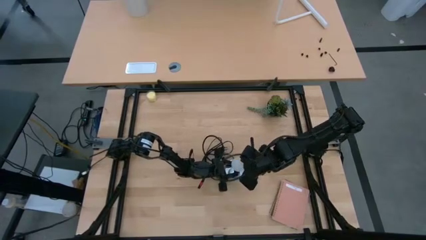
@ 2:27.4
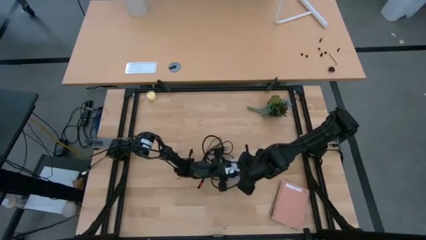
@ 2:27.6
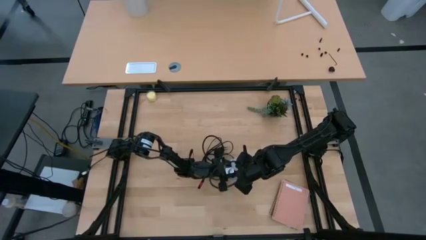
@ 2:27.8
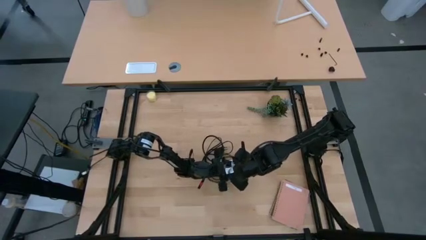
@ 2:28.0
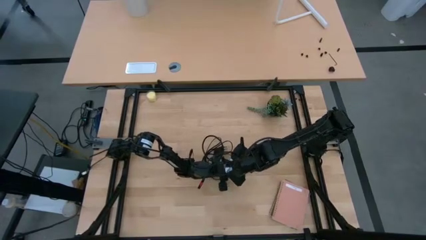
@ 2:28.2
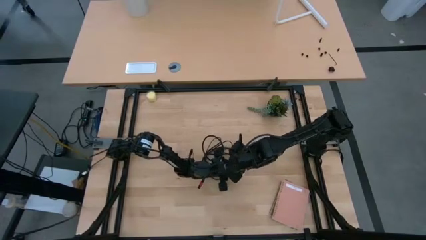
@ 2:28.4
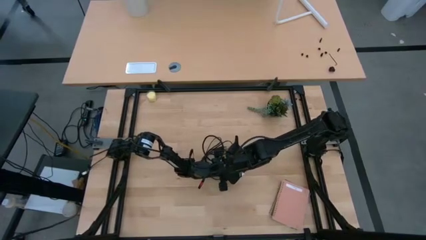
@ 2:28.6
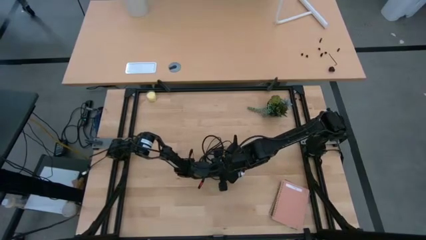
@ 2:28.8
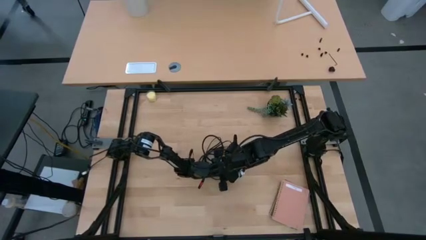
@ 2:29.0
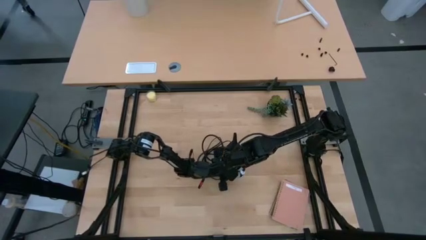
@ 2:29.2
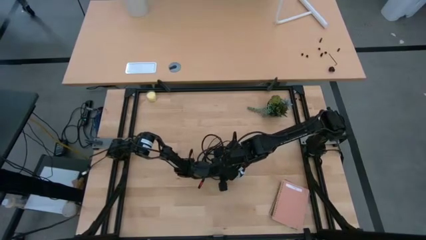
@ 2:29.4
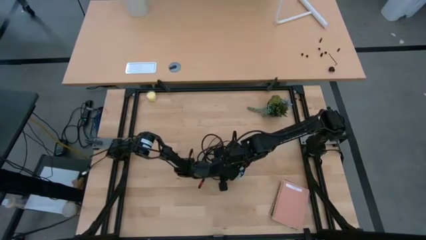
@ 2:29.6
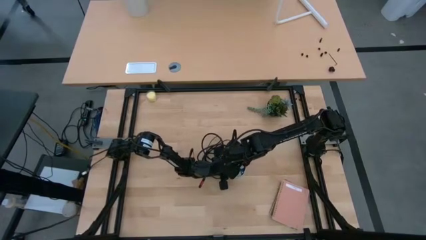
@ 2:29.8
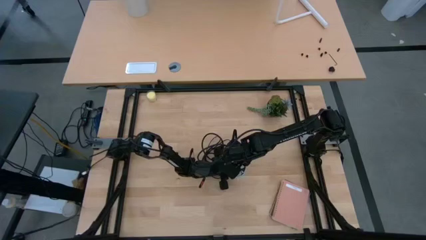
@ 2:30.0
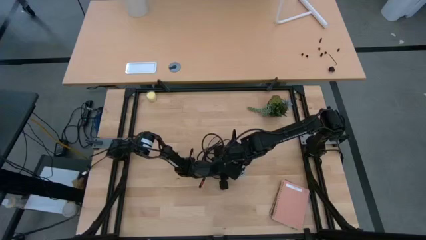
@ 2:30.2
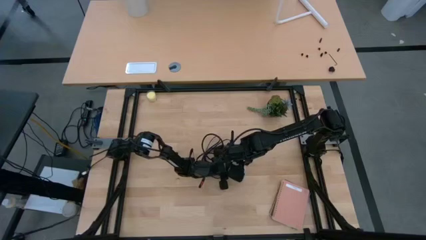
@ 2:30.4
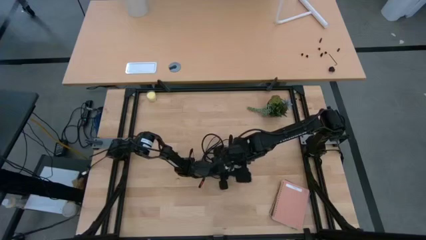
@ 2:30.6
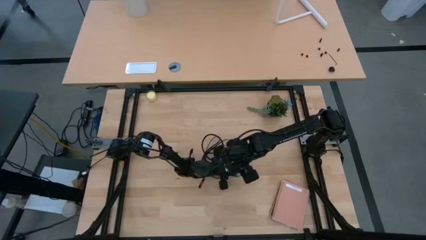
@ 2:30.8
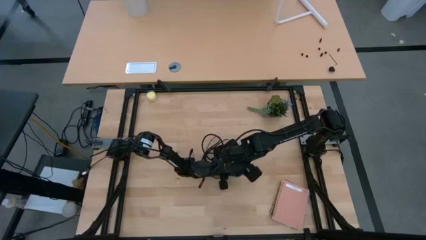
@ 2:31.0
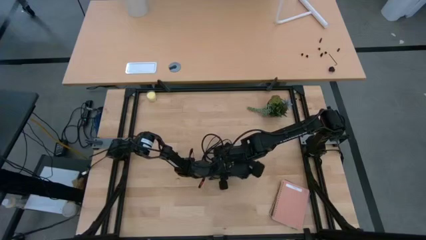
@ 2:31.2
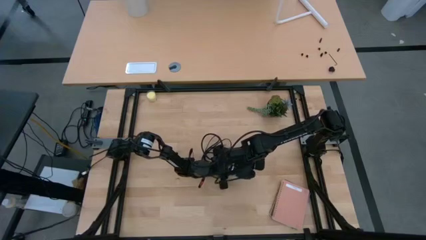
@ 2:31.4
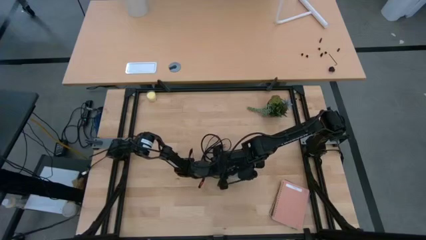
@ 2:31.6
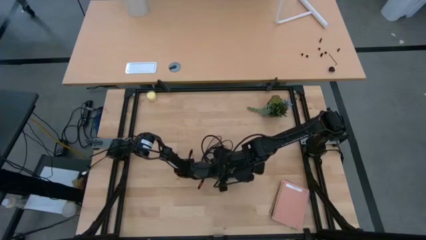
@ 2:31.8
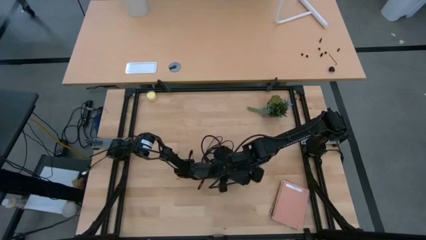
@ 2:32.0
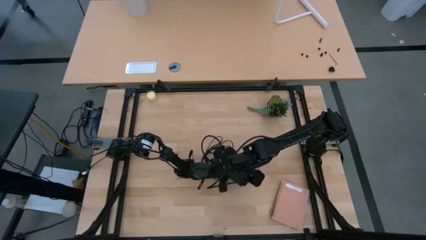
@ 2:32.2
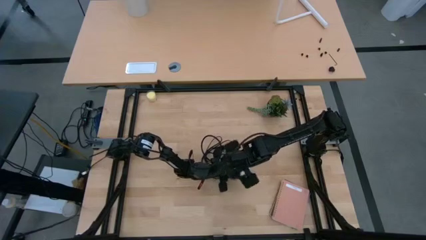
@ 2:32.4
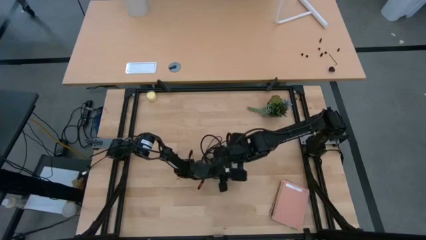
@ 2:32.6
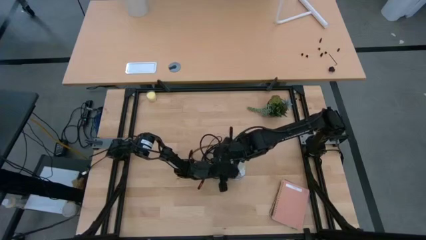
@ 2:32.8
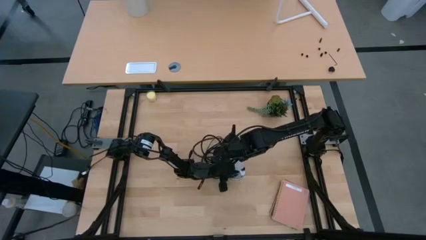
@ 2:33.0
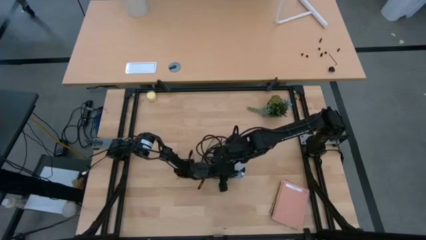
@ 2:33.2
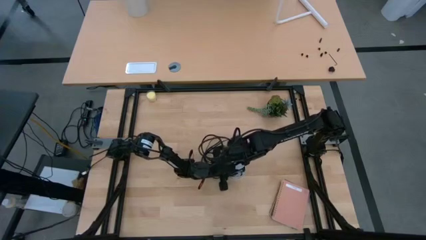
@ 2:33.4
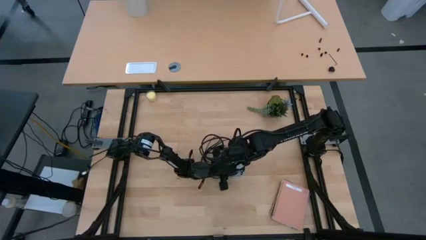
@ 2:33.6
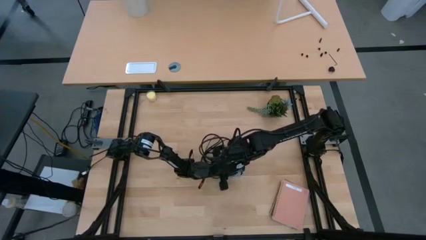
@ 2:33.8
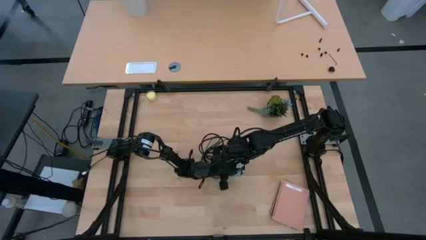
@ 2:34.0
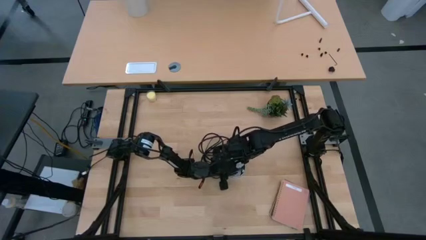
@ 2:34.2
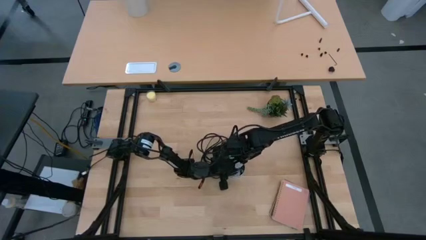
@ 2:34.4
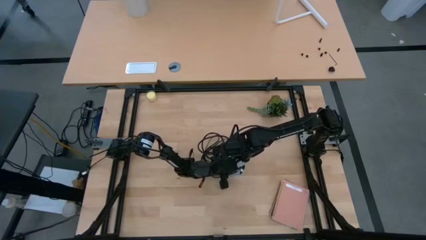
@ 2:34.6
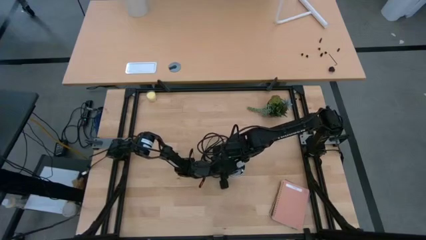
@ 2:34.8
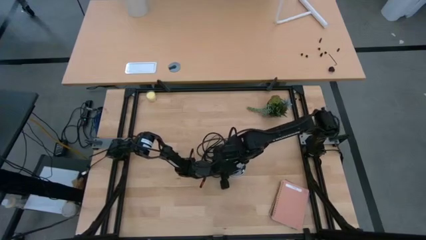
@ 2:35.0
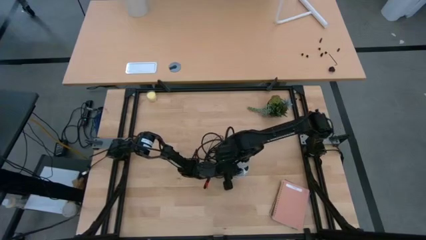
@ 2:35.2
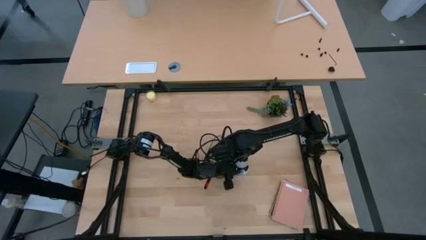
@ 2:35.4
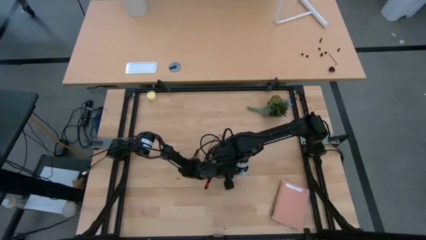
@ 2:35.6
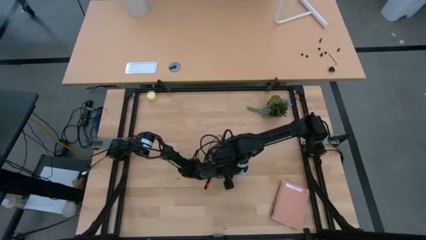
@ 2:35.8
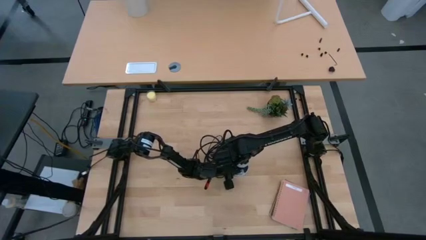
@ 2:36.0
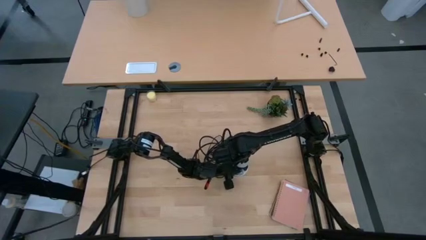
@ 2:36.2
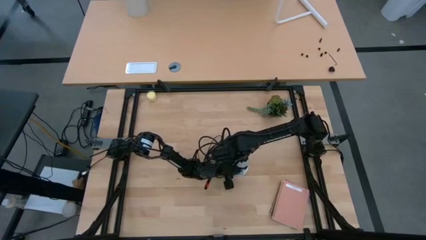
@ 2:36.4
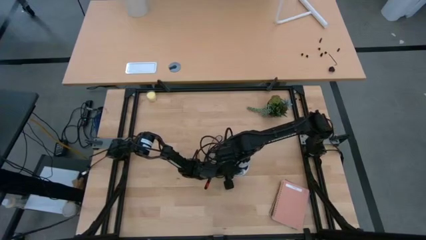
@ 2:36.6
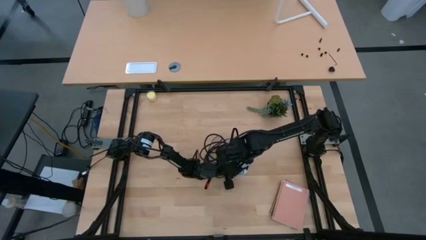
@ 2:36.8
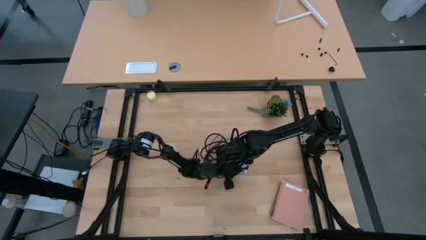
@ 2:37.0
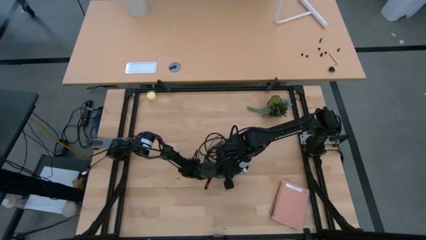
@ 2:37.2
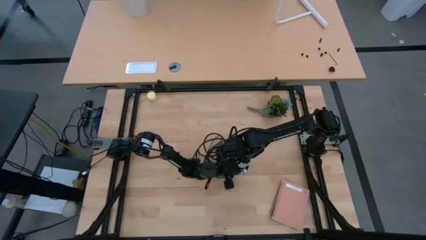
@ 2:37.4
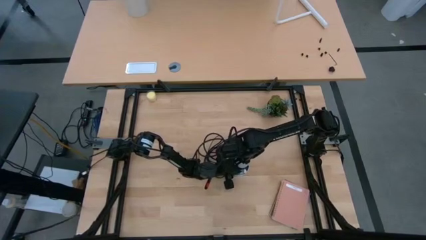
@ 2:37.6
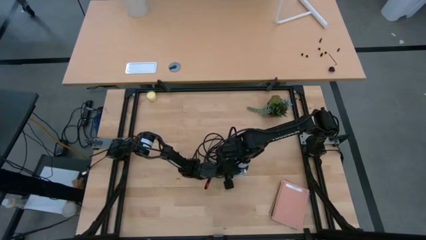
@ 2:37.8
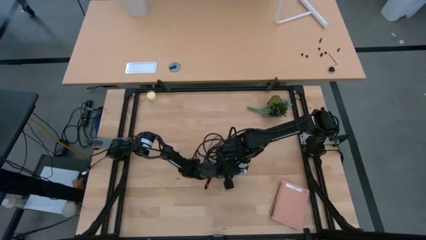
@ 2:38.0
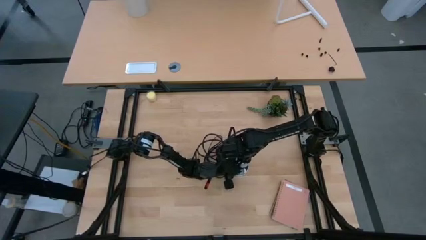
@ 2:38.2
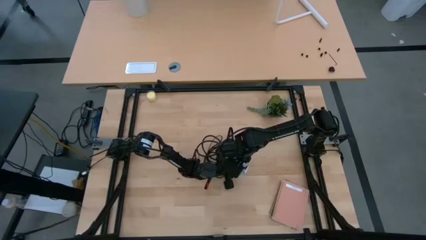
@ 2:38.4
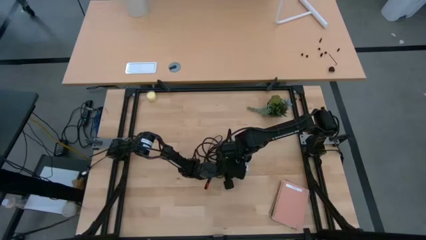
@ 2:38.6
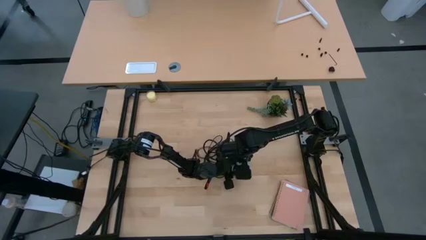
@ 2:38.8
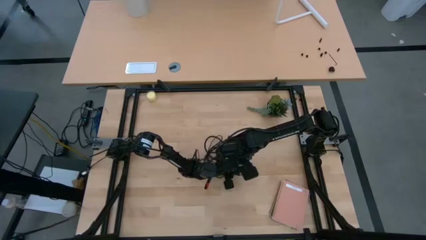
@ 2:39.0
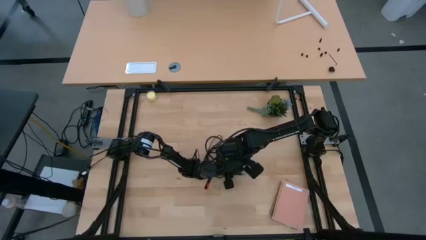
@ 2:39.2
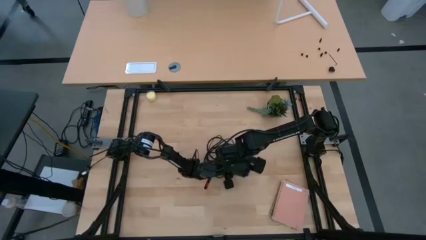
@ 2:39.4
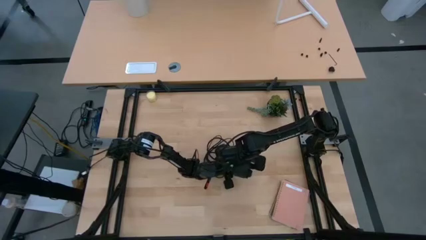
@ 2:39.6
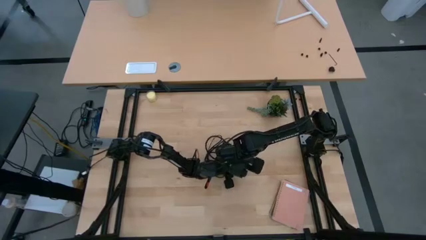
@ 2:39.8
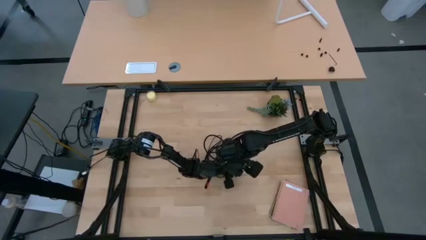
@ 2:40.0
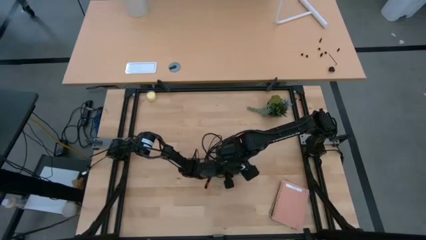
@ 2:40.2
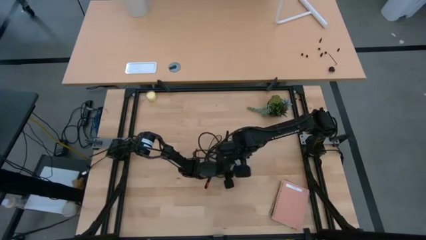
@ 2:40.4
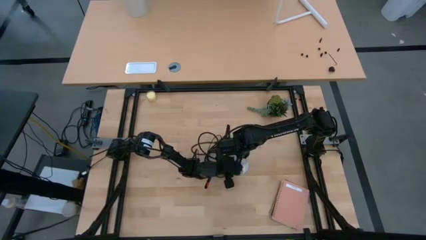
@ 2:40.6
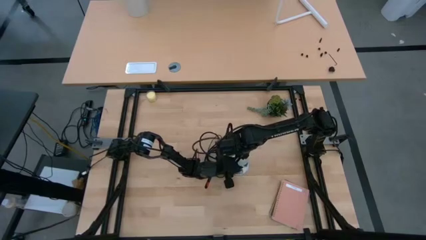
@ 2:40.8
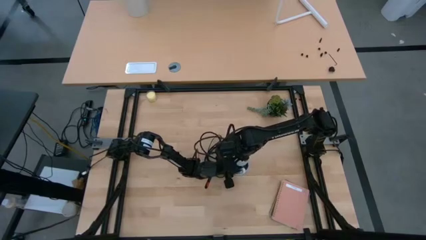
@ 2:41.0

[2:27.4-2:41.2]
Task: Screw lightbulb
Remove the light bulb from the lamp
